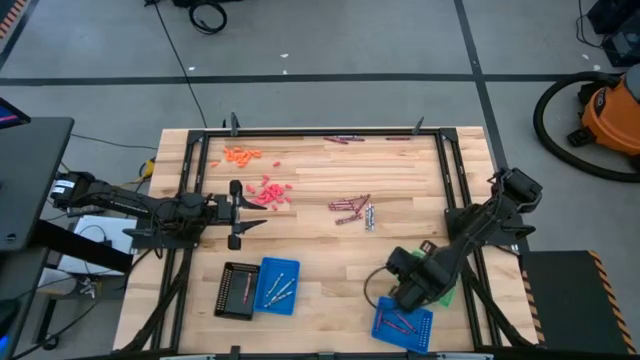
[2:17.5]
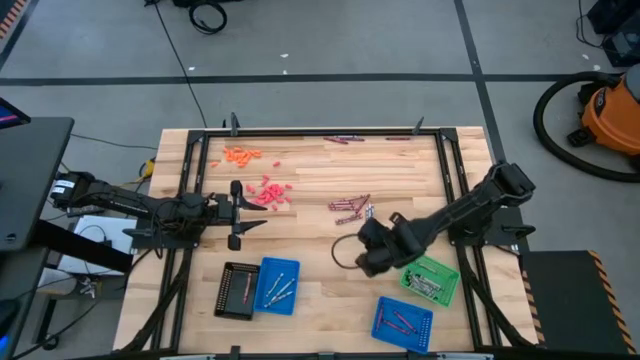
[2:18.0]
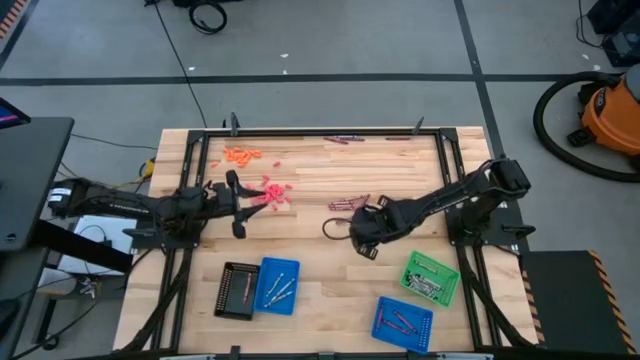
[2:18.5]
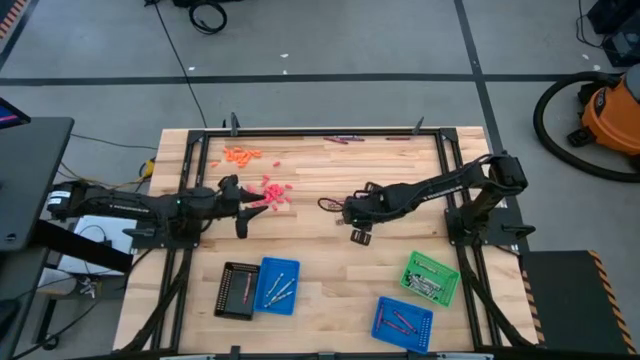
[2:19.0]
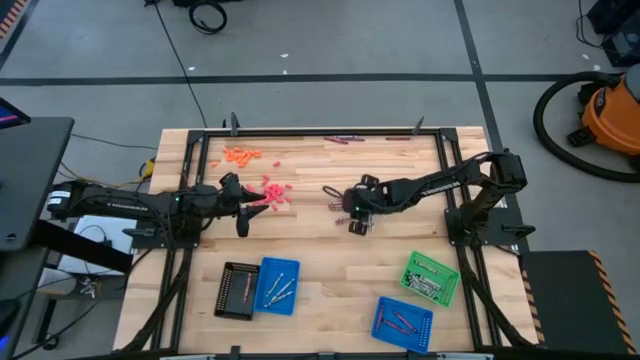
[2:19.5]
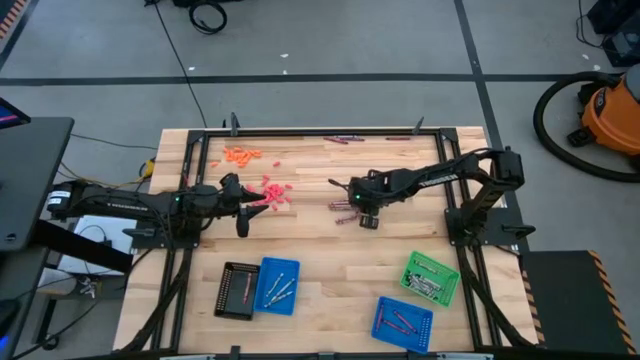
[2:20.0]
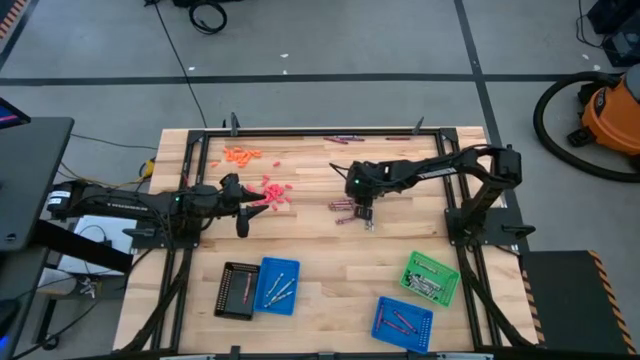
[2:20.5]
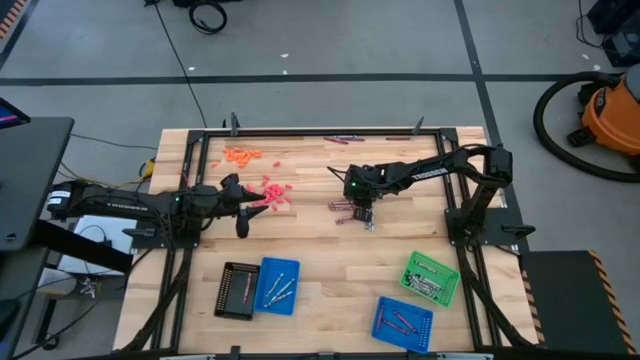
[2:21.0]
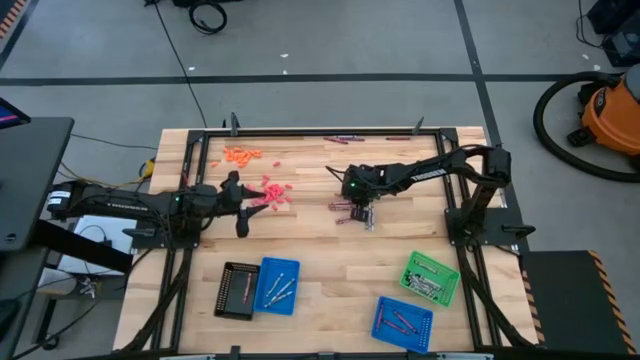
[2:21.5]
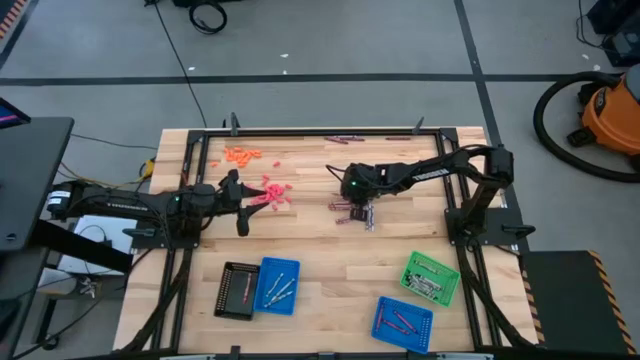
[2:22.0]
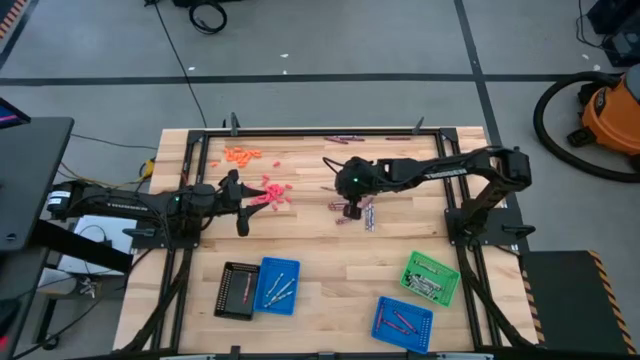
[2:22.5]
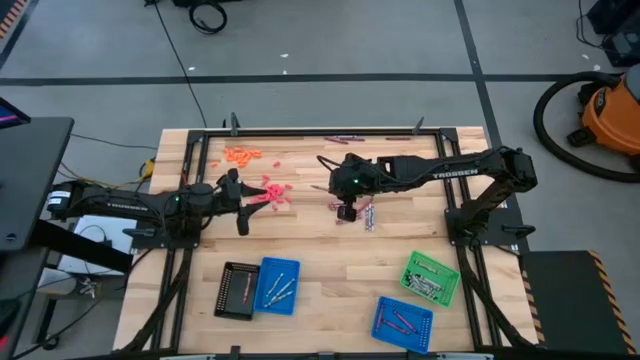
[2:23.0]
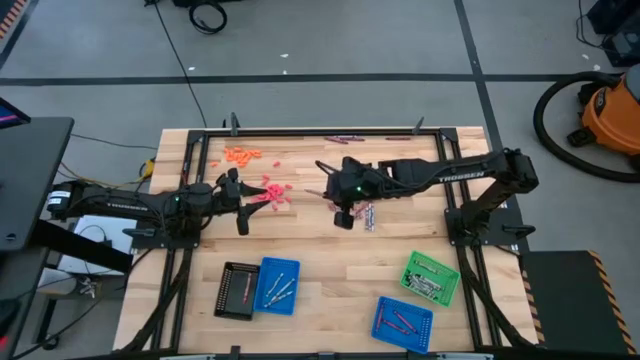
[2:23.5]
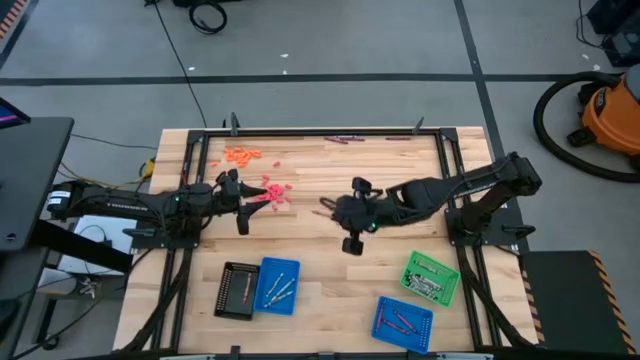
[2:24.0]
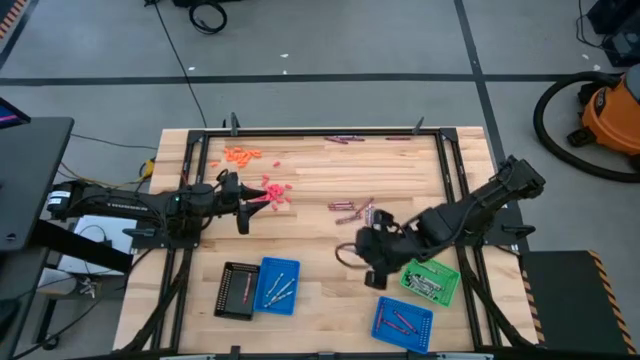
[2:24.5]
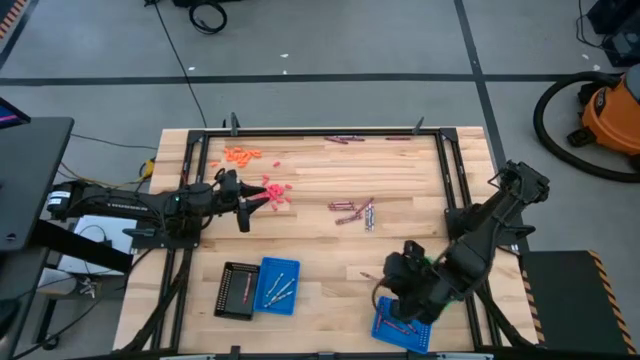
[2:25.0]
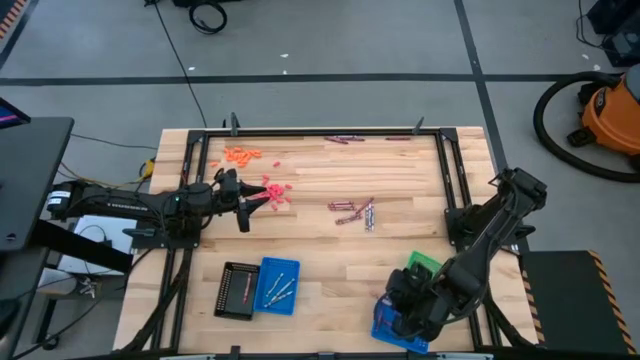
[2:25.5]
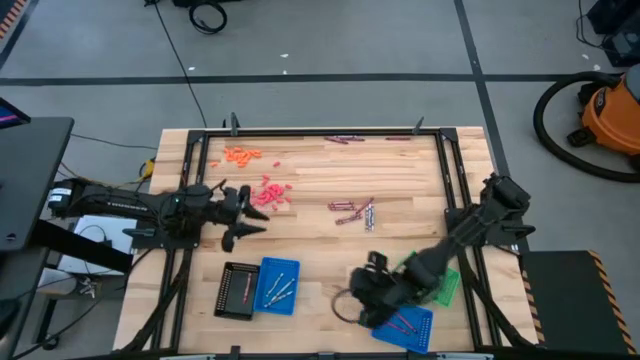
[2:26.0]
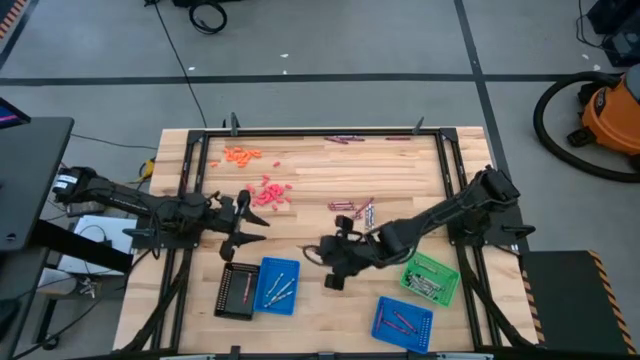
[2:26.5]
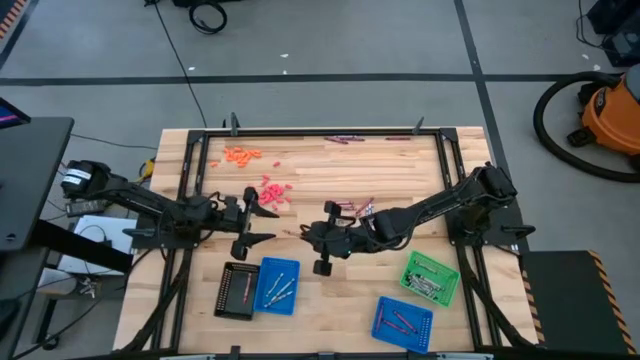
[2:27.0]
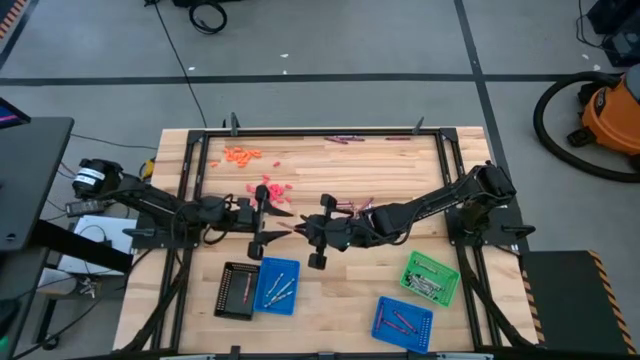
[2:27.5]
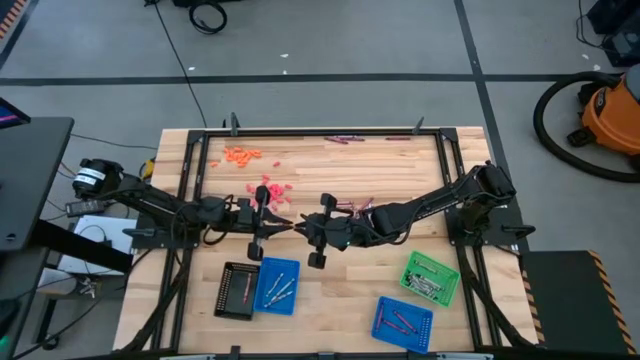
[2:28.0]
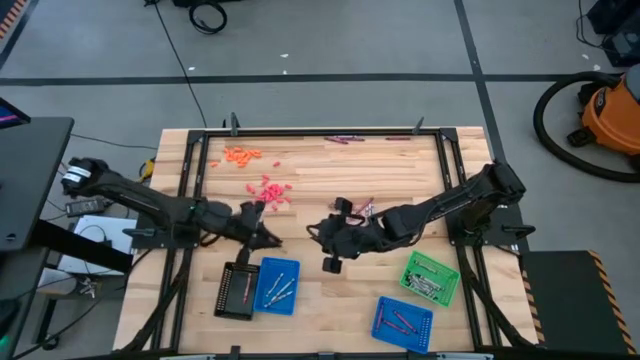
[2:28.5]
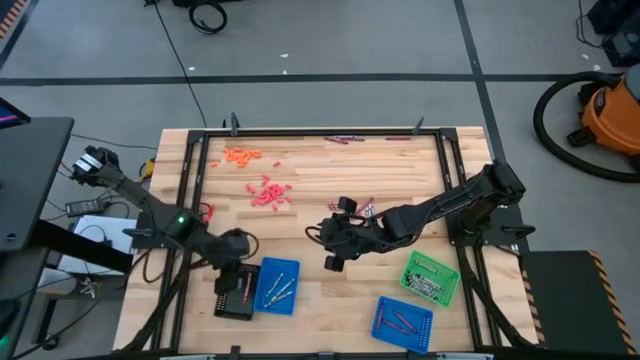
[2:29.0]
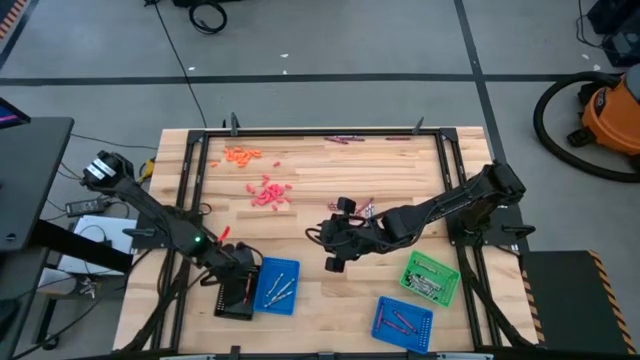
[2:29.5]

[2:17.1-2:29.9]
Task: Sort crayons
Put the pink crayon into the black bin

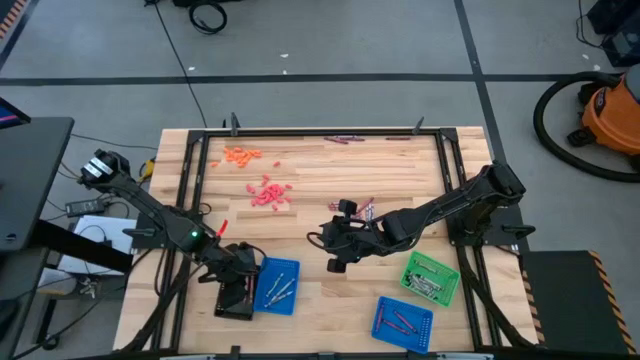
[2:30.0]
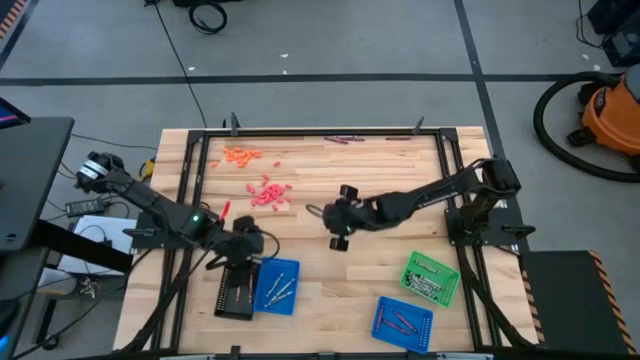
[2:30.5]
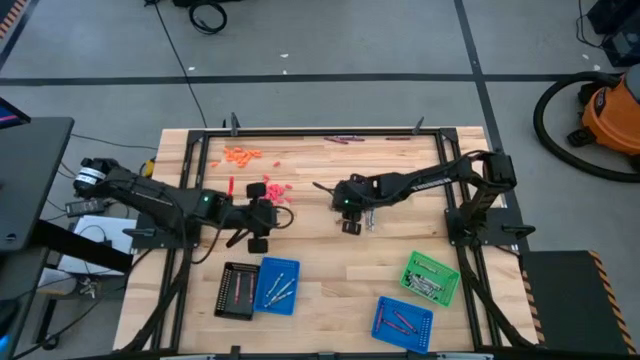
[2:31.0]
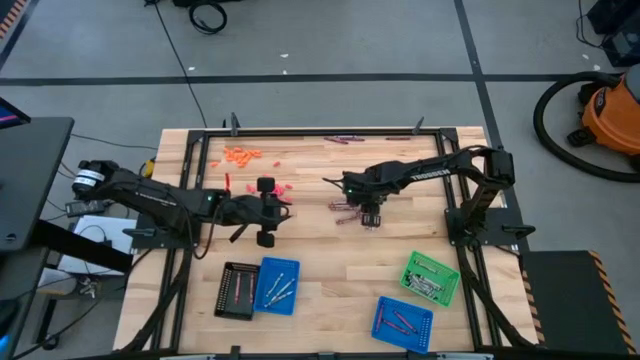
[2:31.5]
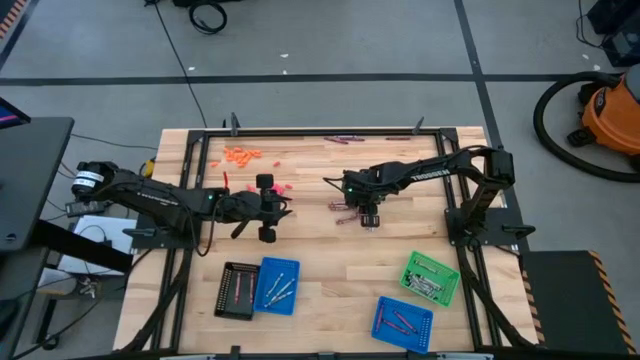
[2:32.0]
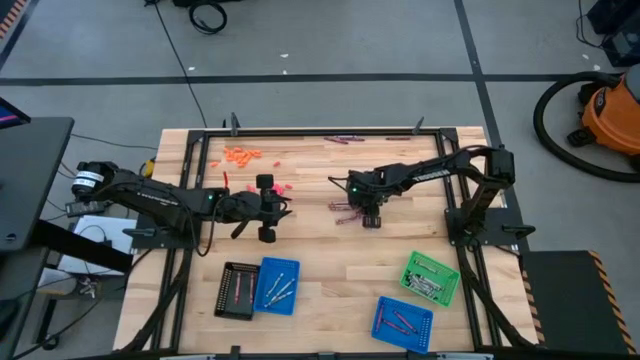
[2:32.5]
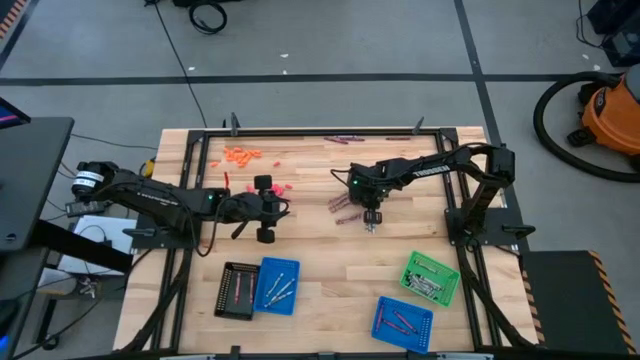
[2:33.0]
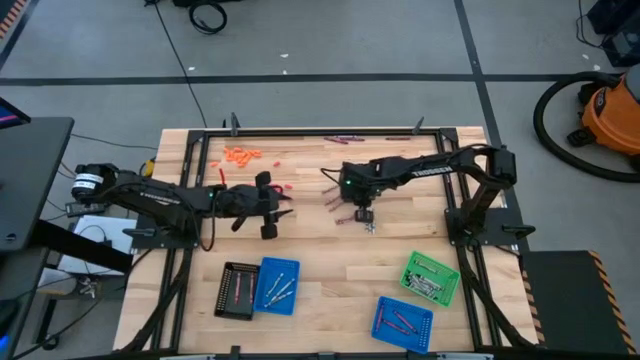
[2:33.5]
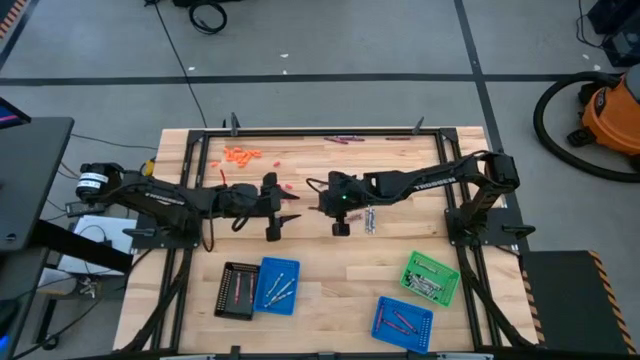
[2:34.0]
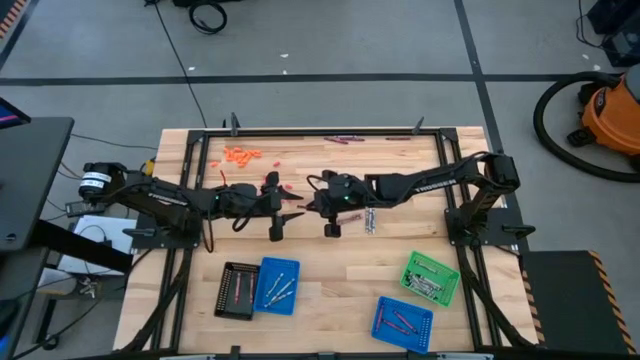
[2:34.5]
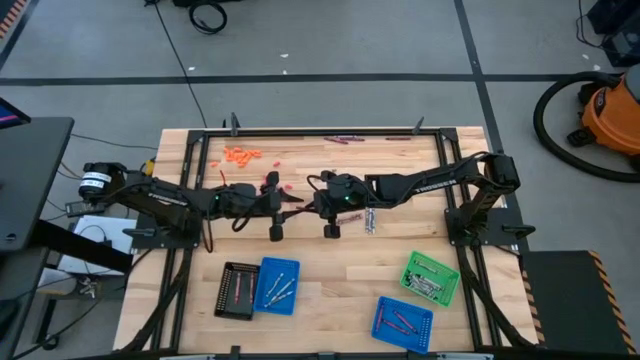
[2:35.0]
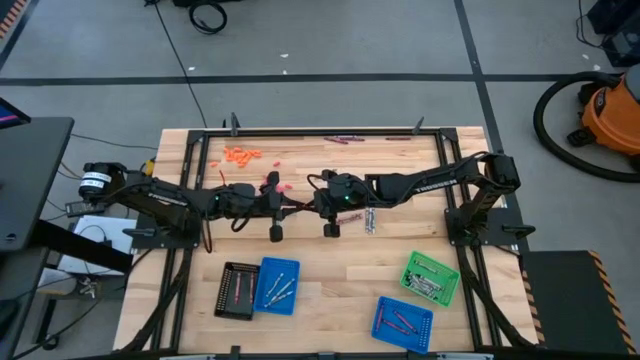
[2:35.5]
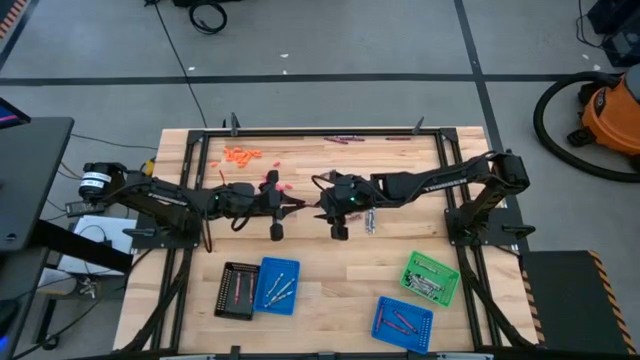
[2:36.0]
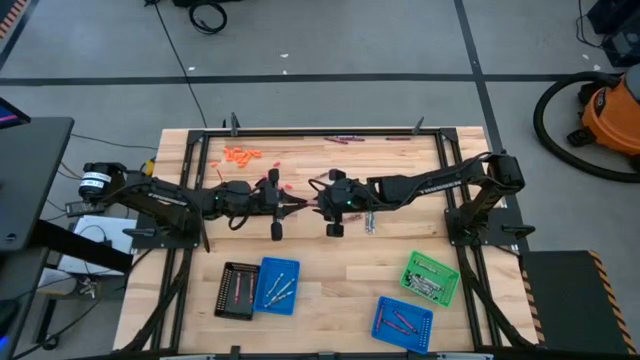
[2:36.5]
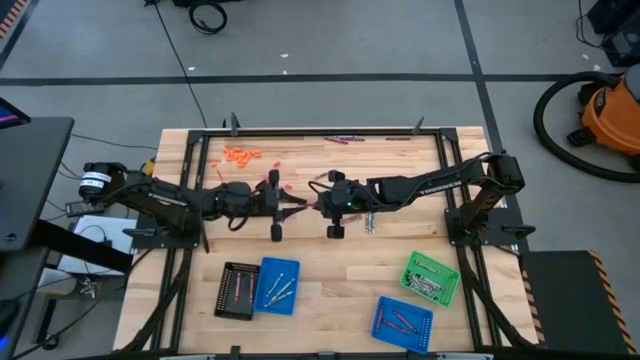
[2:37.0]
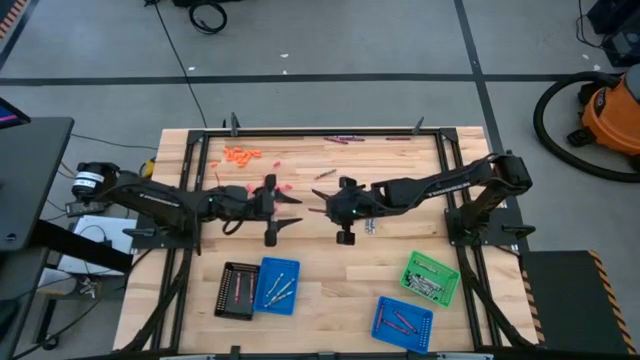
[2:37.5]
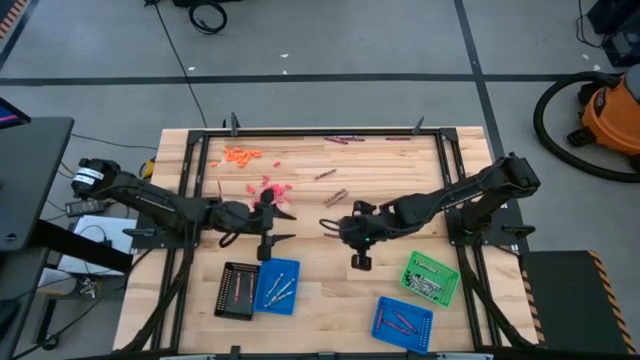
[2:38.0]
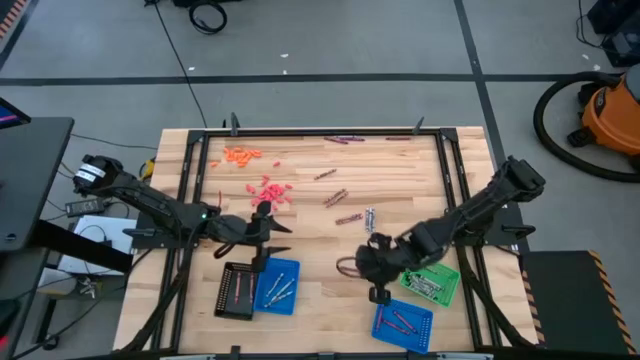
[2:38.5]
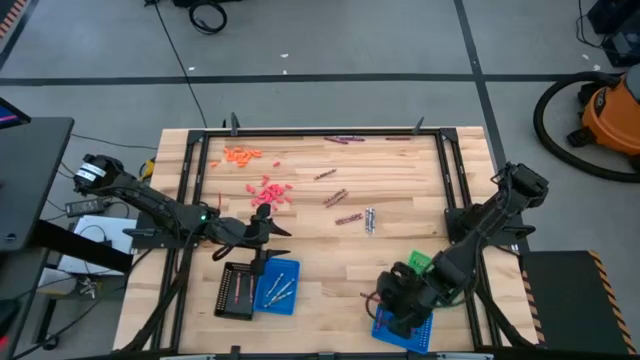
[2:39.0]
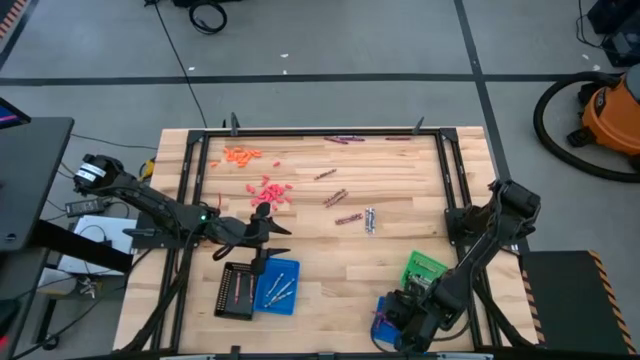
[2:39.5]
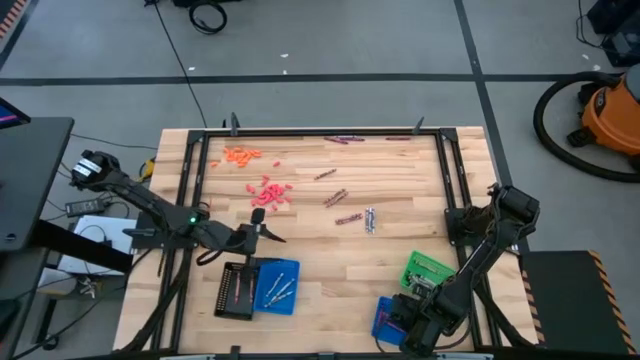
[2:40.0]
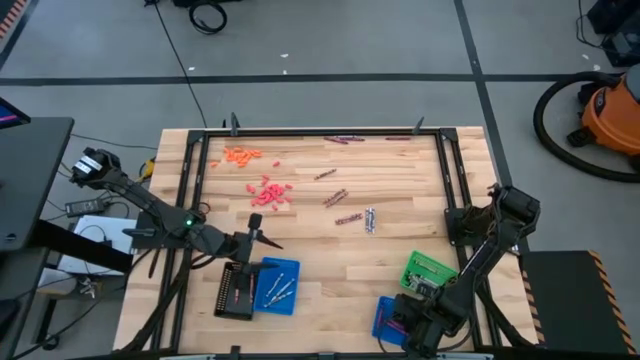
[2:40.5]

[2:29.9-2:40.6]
Put the red crayon into the right blue bin
